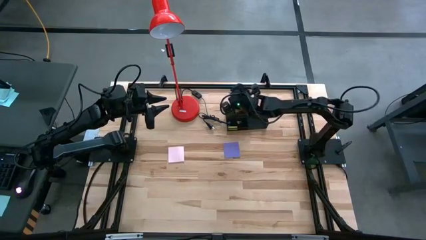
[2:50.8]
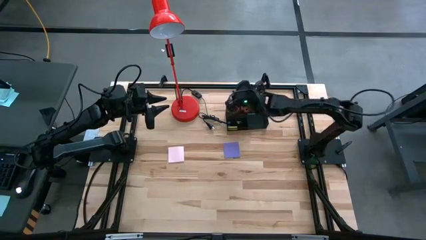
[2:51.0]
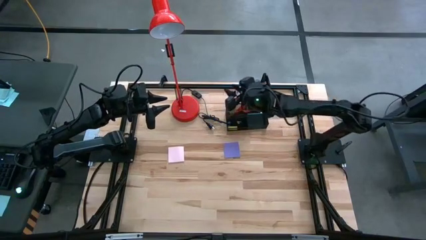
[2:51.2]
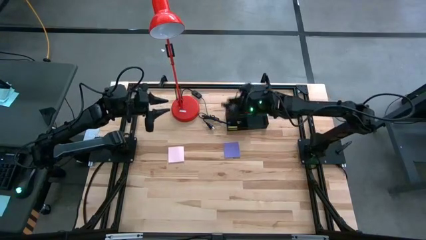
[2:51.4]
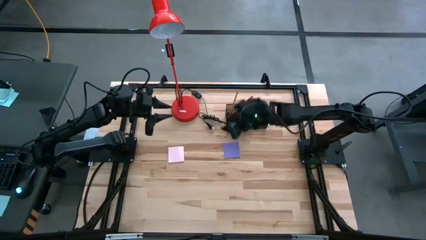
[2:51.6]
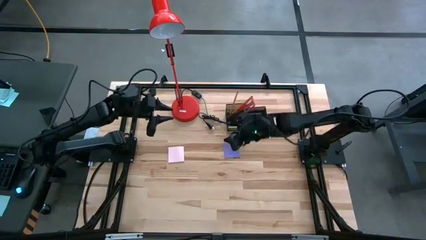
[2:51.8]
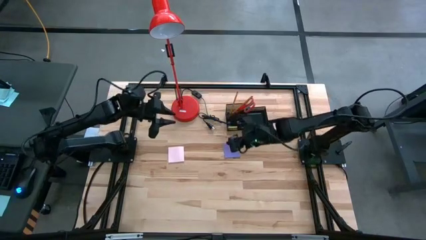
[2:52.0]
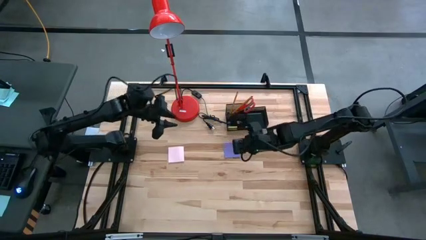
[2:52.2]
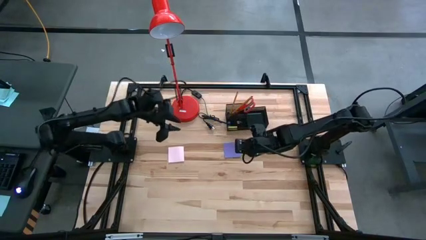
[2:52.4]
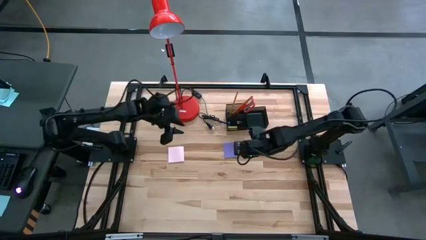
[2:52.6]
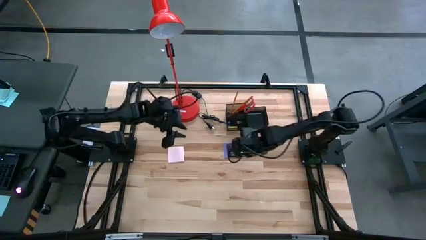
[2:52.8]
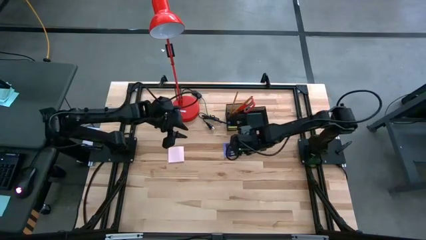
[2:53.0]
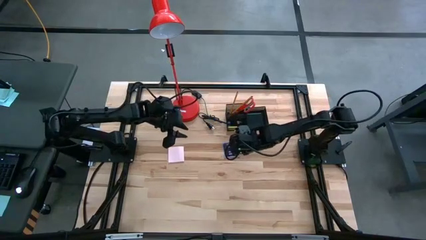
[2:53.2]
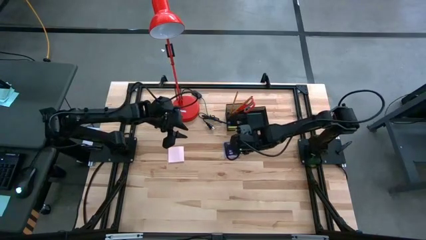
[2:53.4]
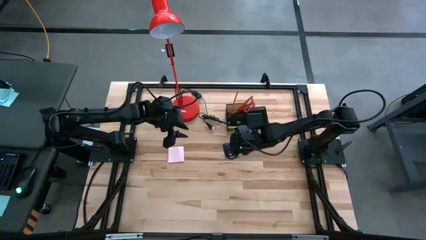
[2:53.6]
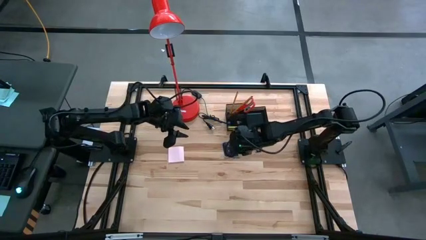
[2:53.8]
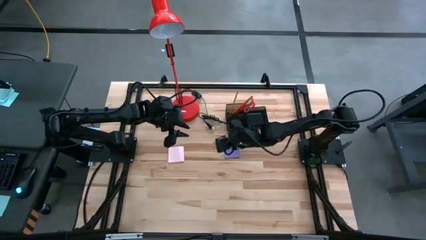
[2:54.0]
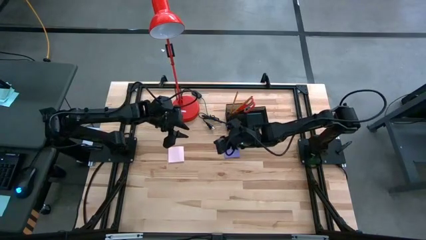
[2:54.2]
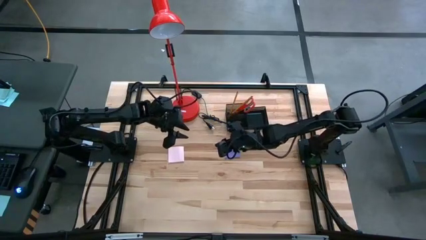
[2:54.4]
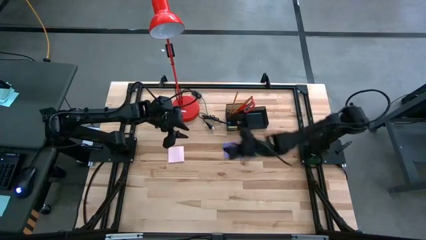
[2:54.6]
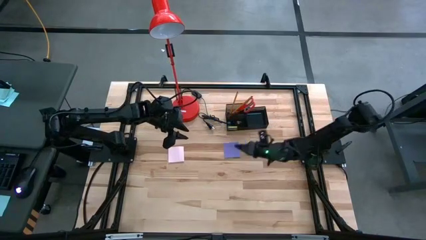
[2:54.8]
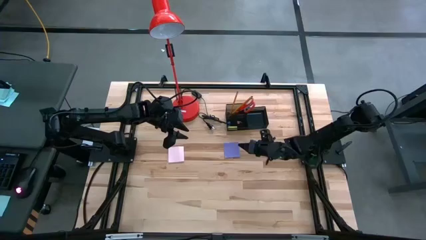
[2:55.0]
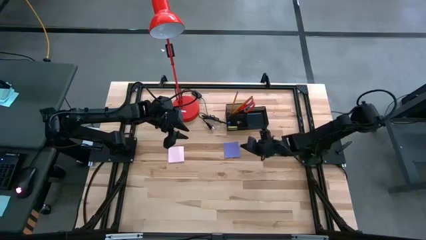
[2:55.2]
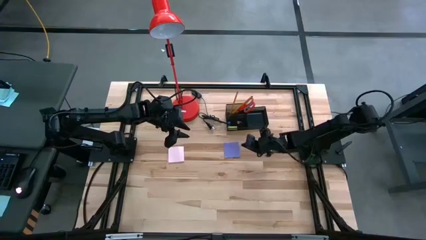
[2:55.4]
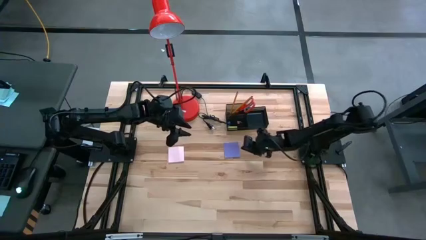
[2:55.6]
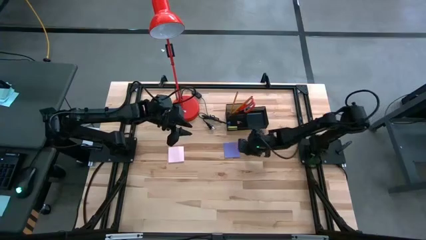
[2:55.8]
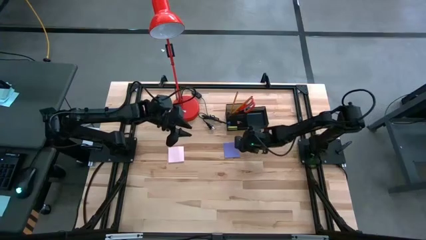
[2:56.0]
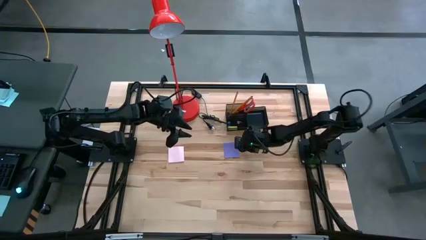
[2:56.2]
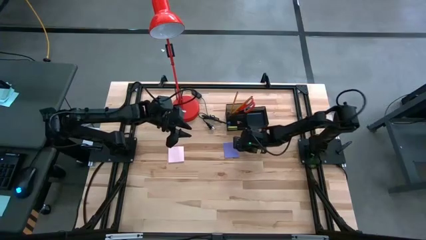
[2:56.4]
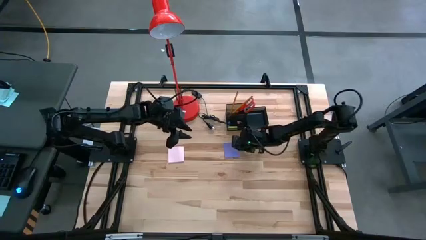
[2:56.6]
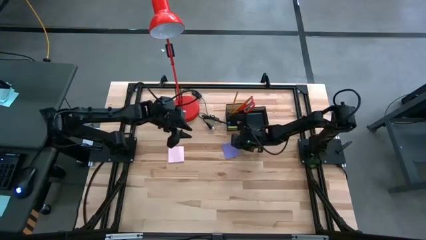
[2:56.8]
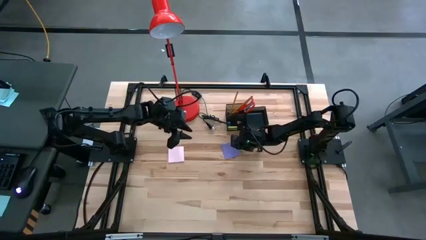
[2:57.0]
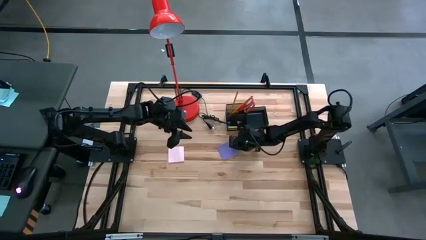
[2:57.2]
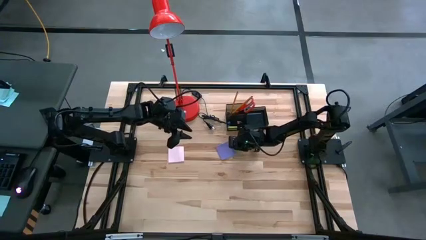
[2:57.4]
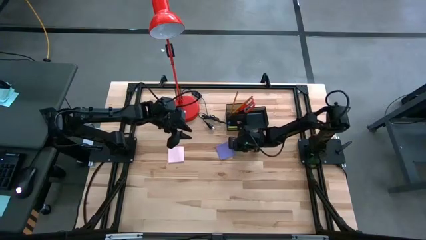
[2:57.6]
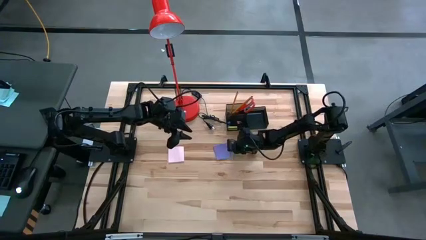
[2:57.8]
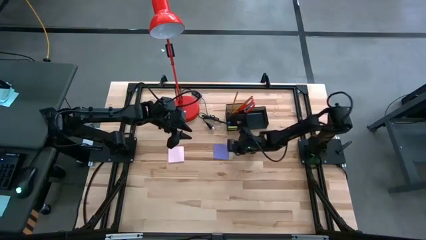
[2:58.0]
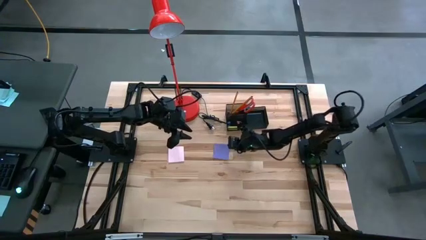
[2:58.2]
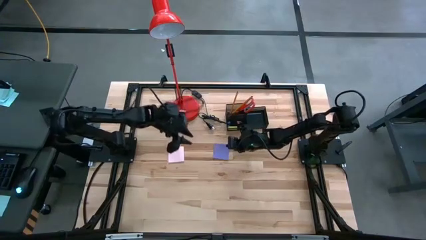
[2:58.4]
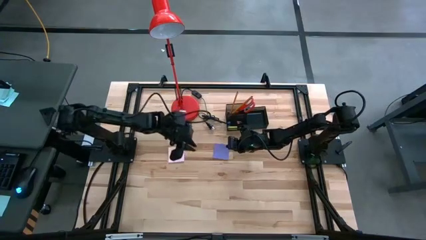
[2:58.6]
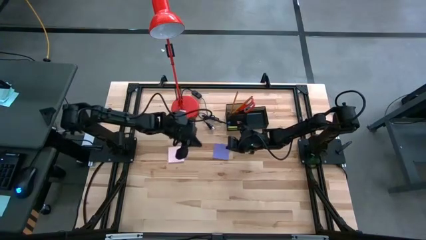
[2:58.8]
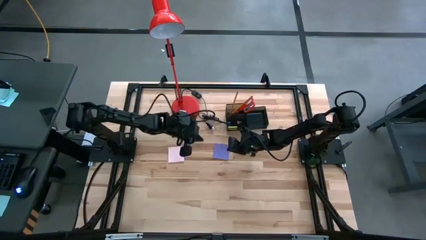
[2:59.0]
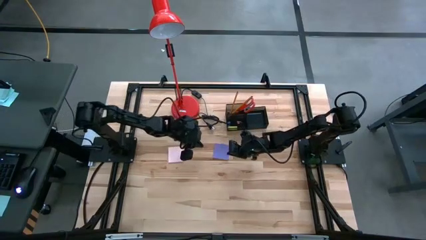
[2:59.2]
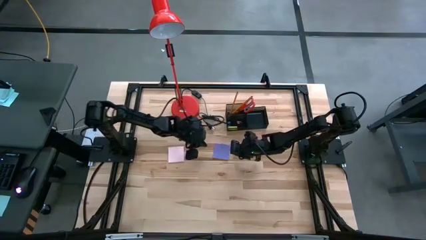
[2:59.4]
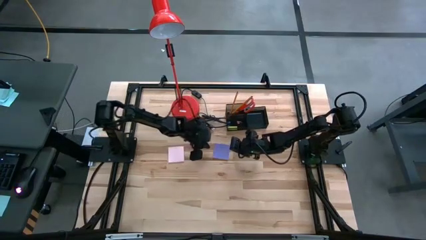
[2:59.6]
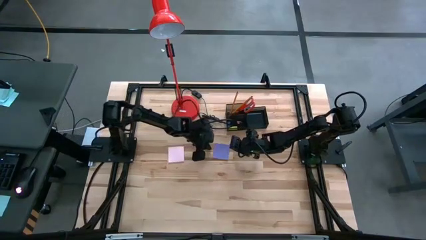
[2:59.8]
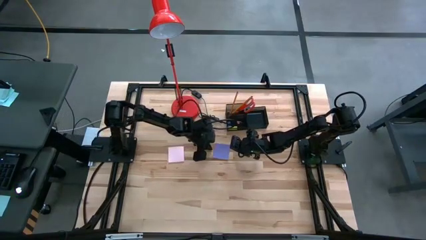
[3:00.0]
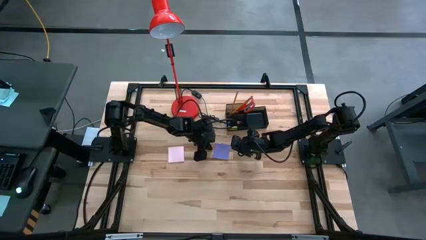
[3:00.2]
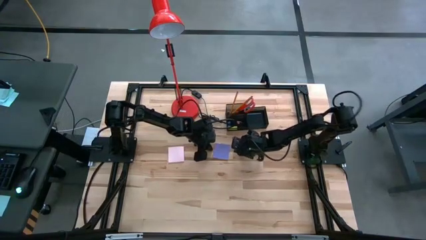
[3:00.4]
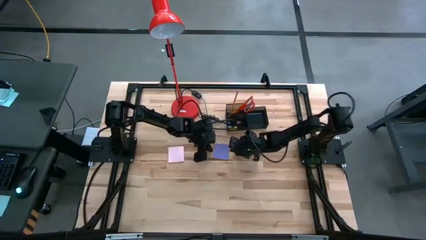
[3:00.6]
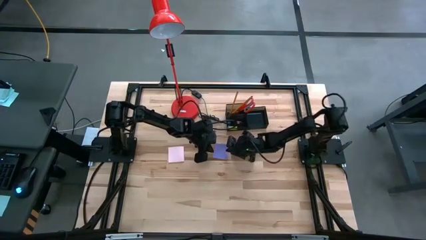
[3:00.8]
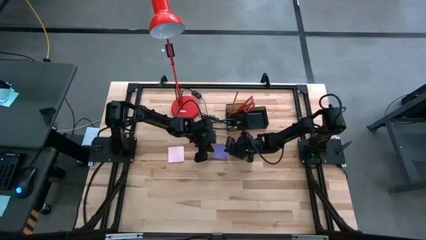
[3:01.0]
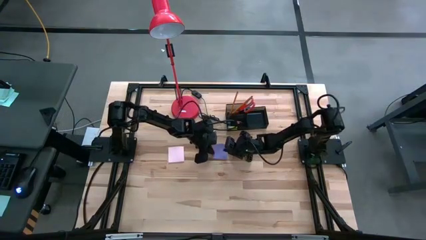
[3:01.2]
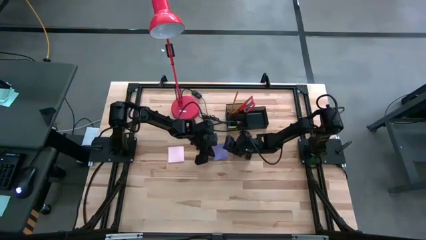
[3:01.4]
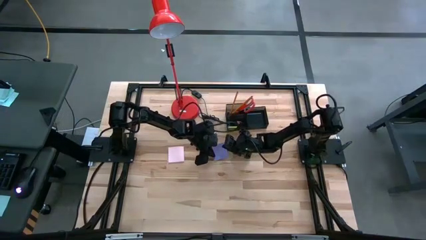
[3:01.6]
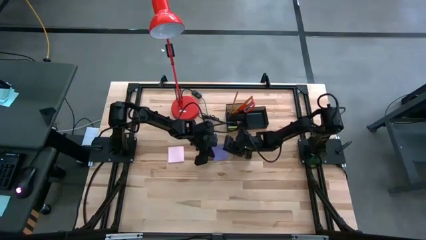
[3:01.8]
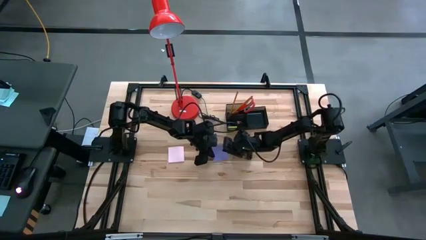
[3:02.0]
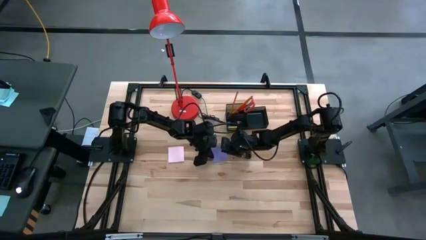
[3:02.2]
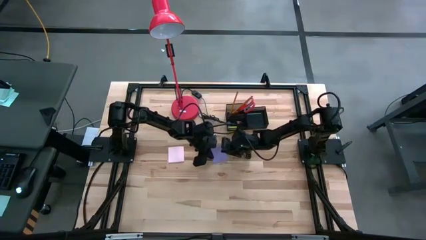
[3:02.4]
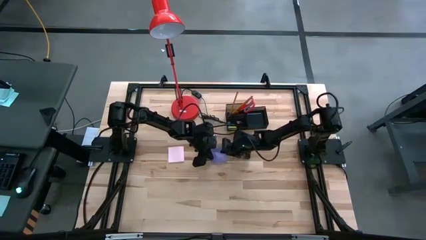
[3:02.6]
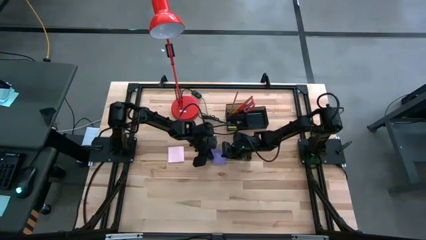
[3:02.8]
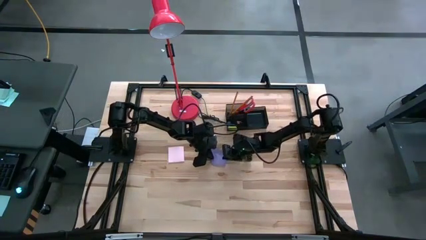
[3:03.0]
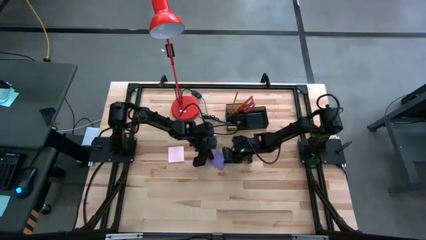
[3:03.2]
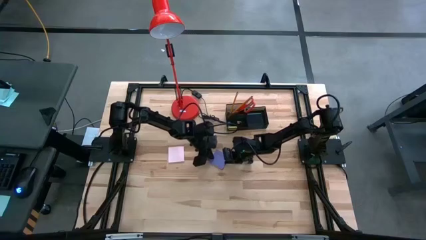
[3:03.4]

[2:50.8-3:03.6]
Task: Pick and place office supplies into organizer
Put the purple sticky notes into the black desk organizer
